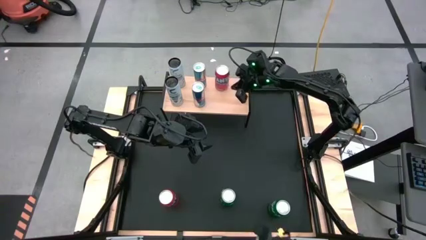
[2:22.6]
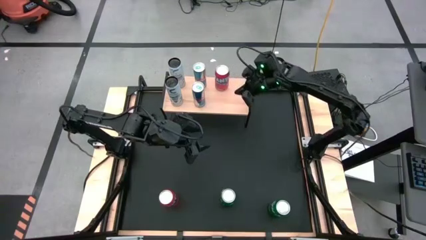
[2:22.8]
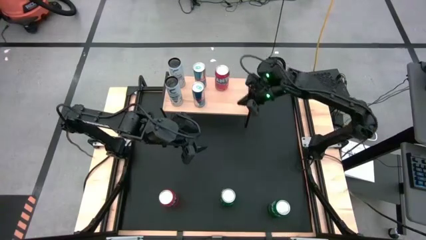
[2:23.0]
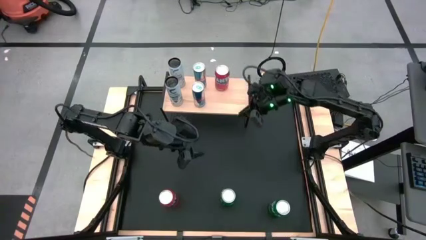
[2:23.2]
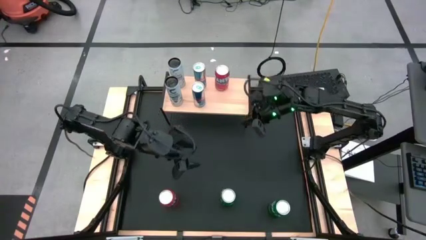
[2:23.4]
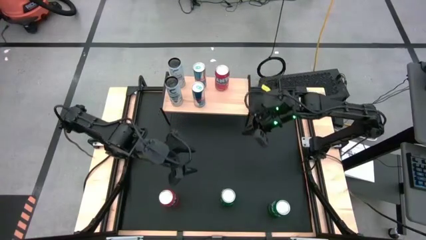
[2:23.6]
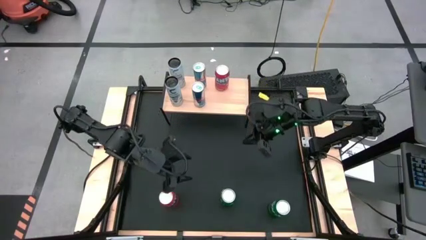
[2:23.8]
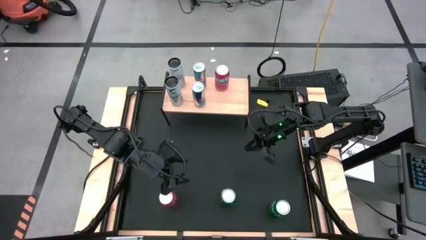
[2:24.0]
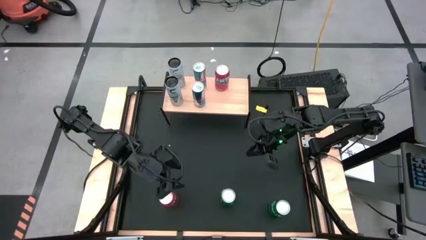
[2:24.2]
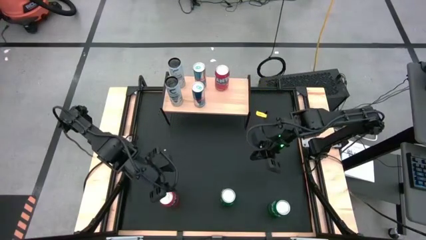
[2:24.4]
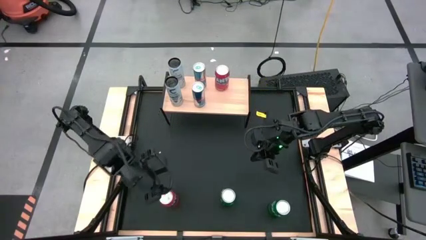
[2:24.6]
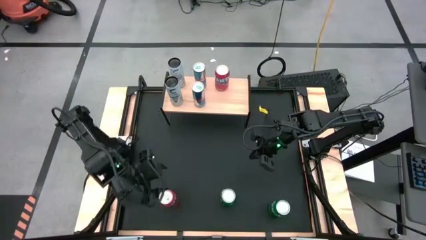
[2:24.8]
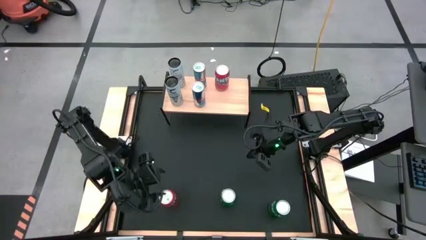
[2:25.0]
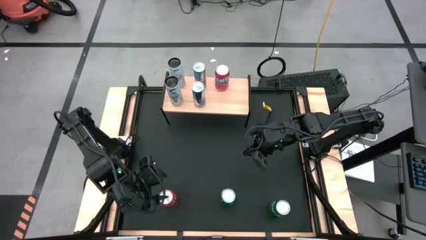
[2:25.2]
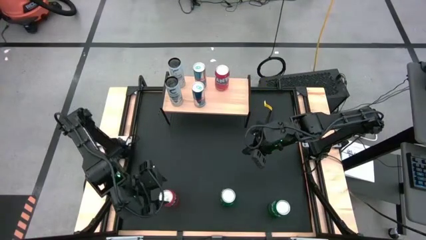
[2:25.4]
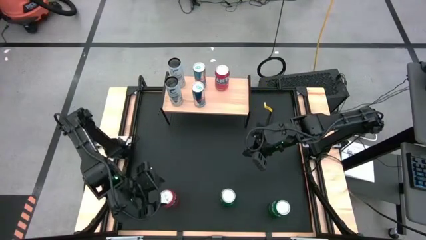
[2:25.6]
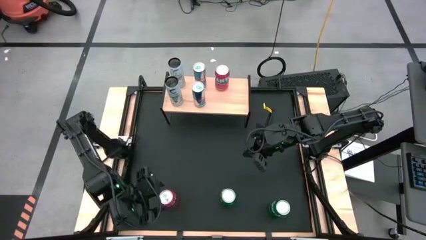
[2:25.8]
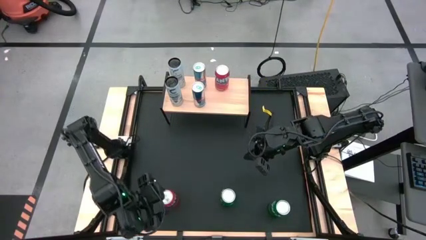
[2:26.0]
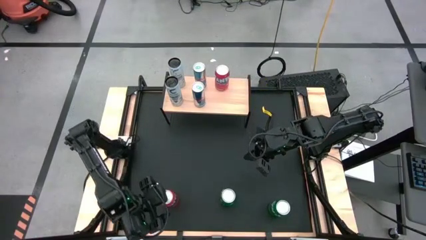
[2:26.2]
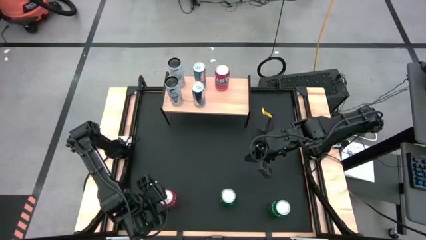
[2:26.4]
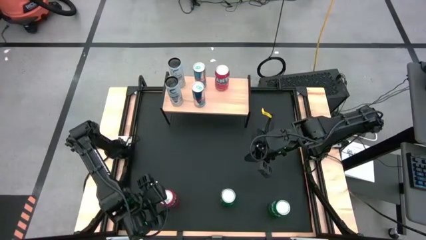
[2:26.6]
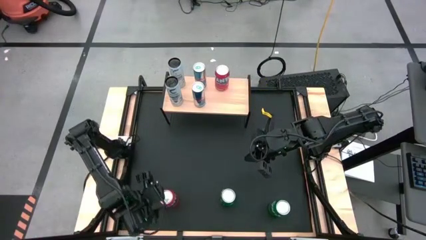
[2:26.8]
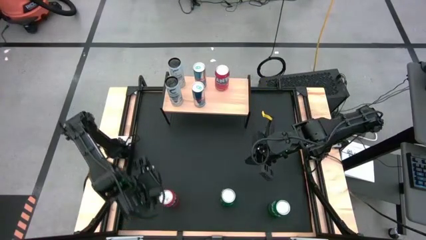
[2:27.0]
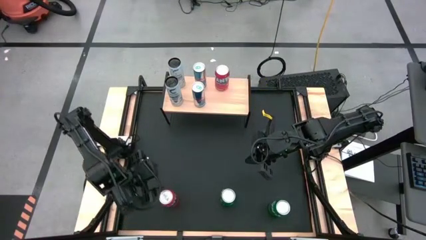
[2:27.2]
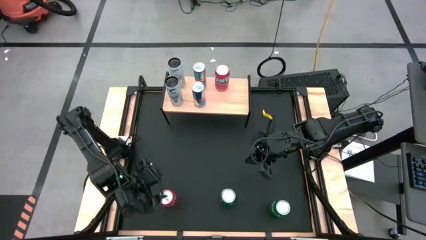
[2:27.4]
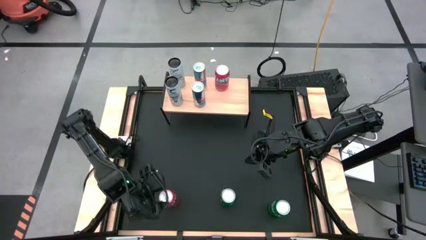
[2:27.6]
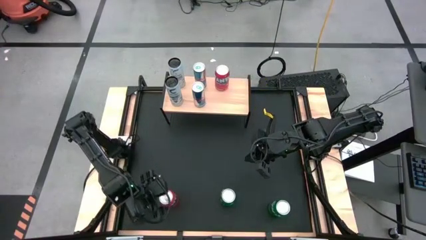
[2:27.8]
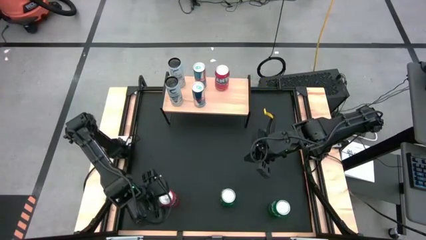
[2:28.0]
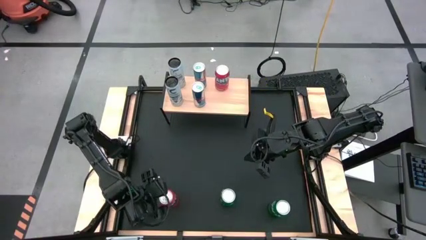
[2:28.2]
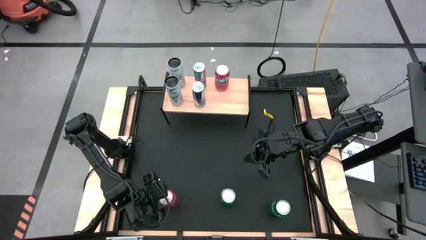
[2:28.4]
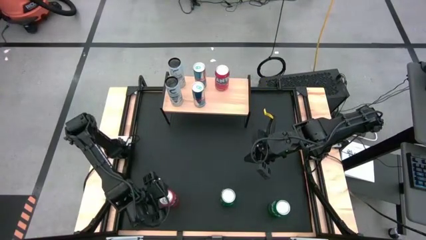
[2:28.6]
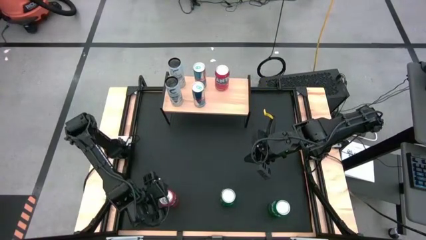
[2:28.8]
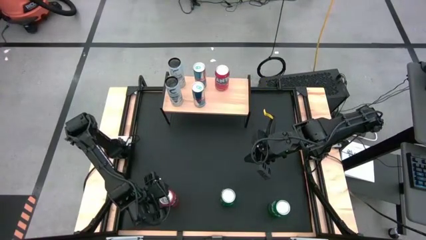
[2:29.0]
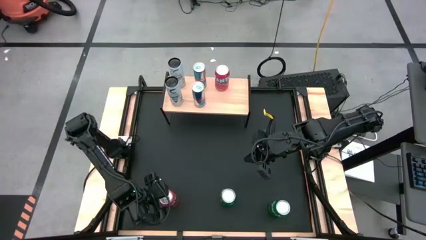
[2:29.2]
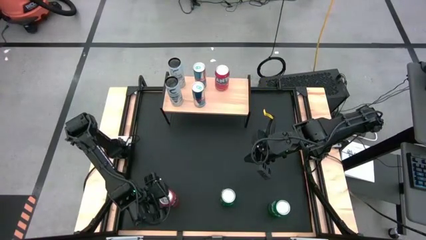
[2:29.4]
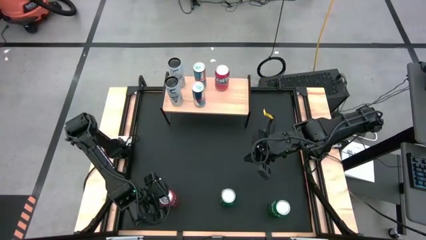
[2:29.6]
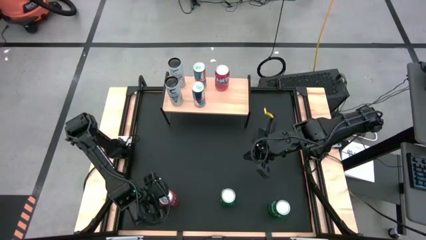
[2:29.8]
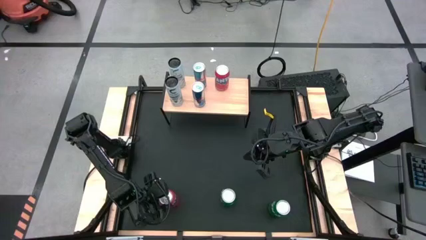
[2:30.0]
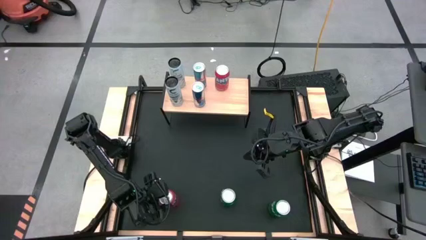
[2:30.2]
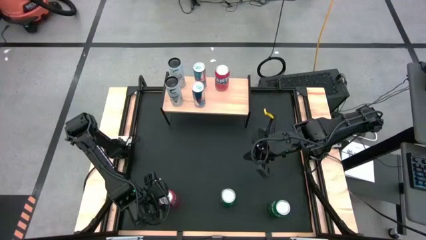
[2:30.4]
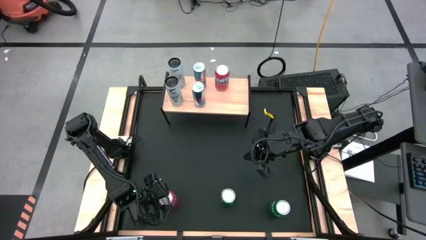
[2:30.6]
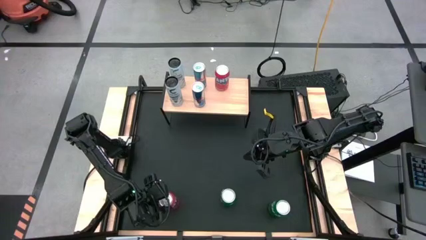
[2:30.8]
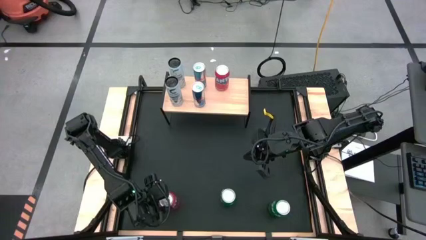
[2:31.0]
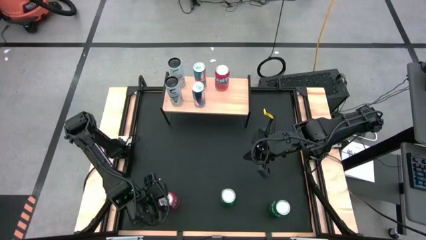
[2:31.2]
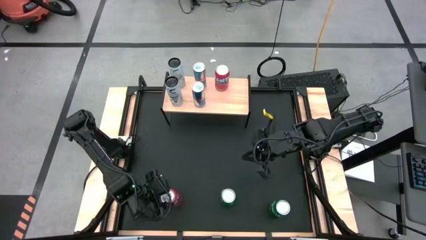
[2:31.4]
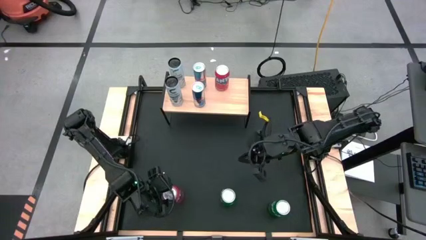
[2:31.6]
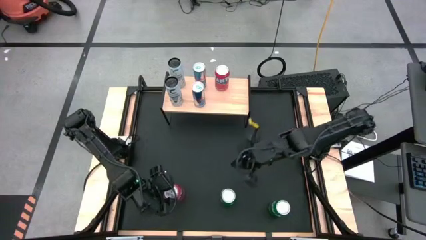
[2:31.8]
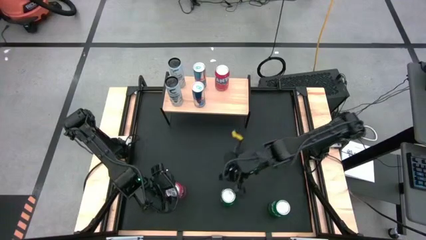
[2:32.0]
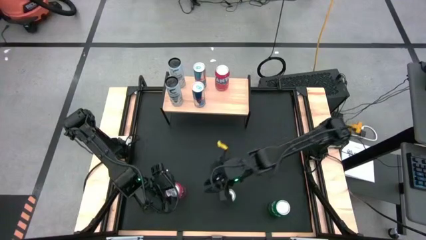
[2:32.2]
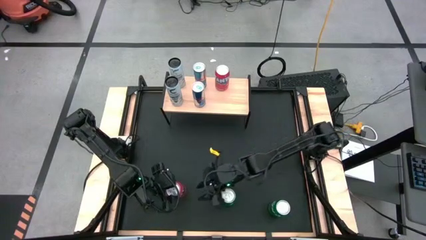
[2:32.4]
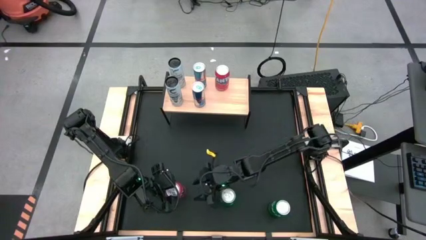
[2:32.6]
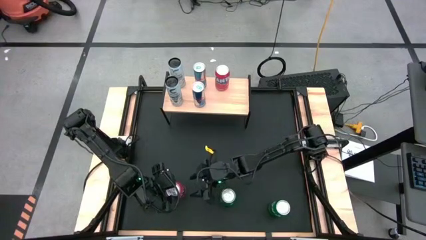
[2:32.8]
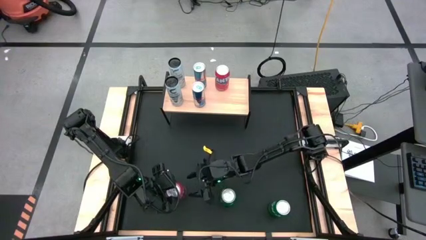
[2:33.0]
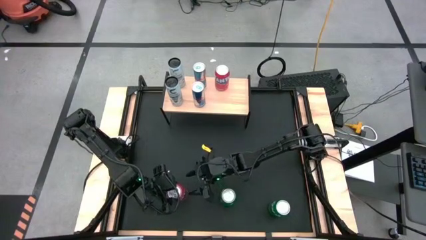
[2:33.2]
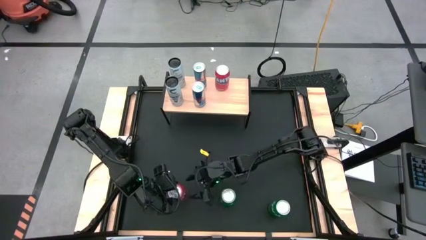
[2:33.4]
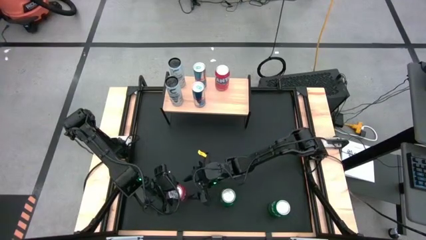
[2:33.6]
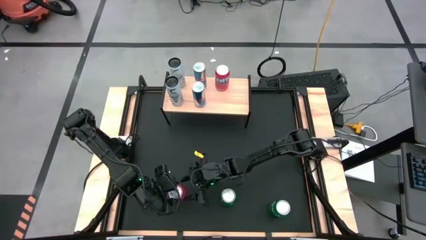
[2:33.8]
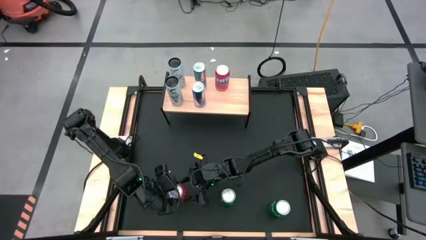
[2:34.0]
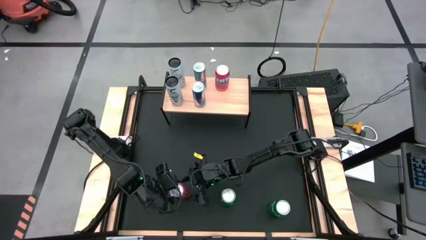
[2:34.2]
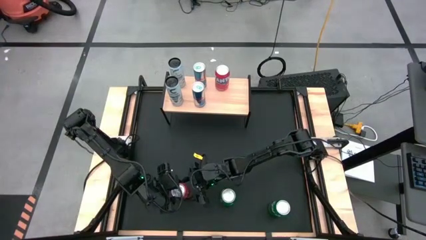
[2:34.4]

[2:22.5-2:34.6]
Task: Place canned beverage on shelf
Put the orange soda can, aligned with the other orange soda can on the shelf

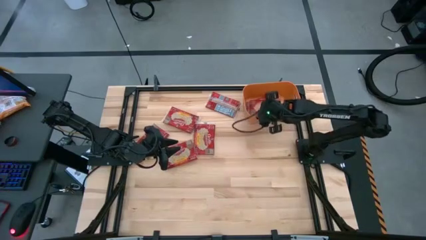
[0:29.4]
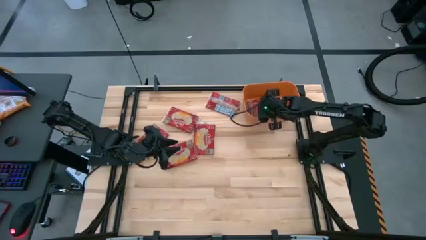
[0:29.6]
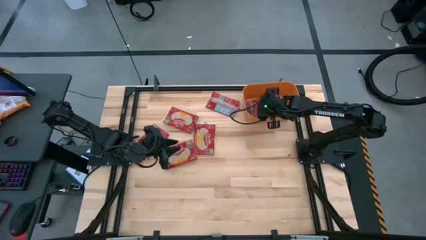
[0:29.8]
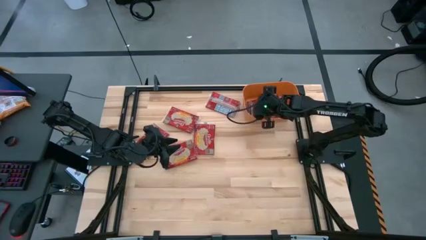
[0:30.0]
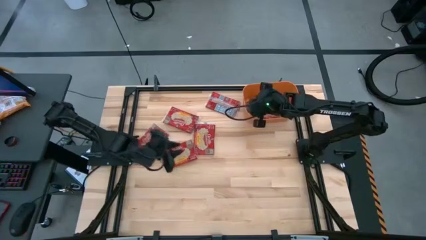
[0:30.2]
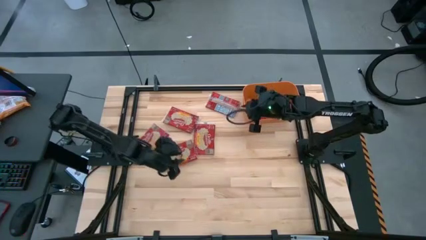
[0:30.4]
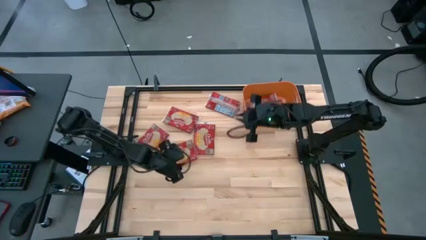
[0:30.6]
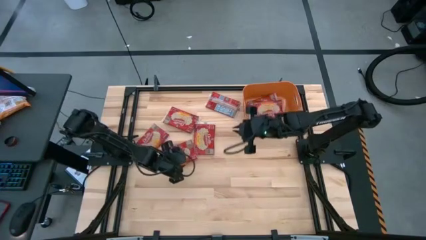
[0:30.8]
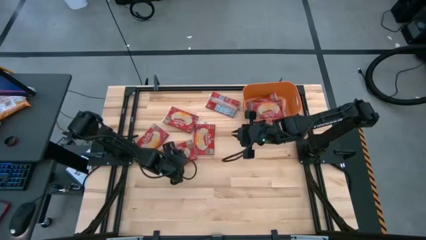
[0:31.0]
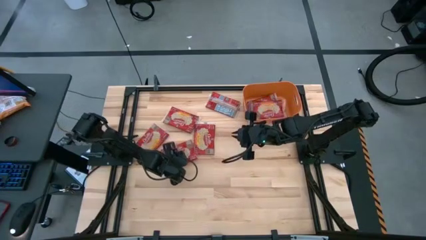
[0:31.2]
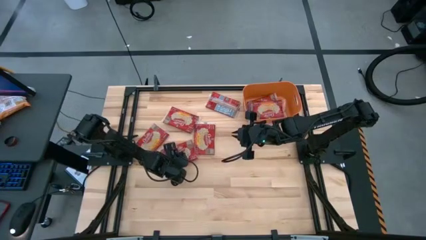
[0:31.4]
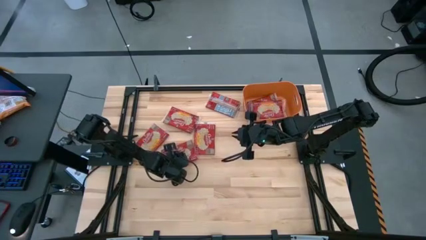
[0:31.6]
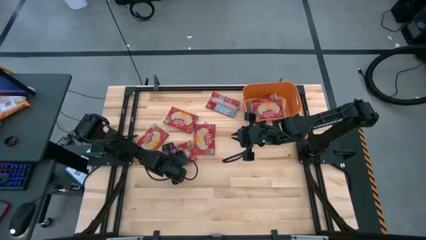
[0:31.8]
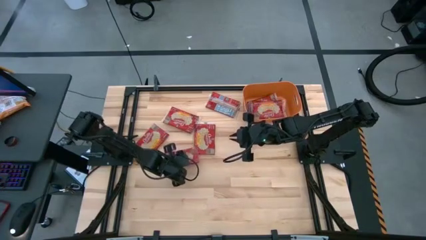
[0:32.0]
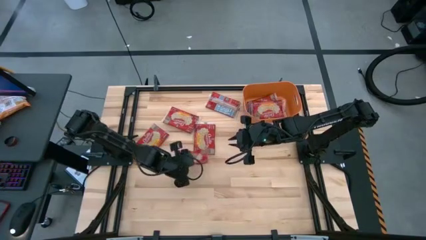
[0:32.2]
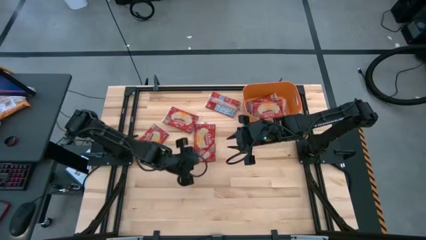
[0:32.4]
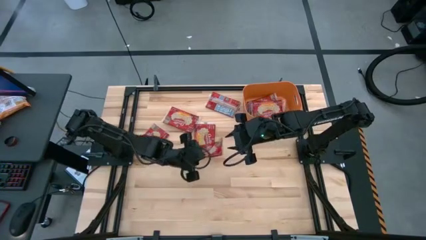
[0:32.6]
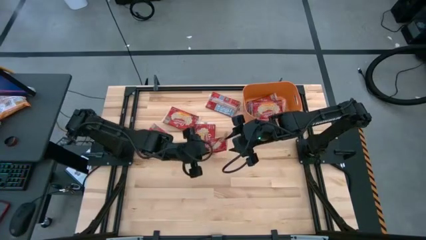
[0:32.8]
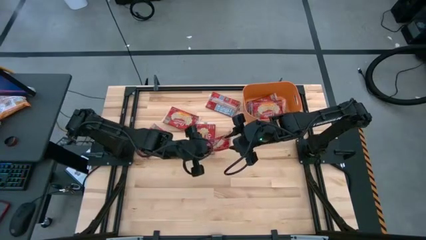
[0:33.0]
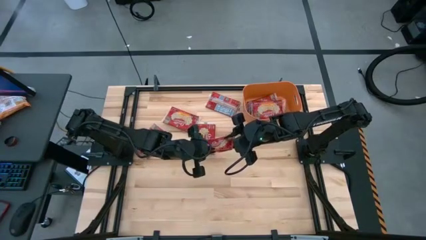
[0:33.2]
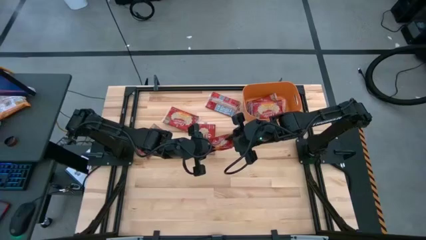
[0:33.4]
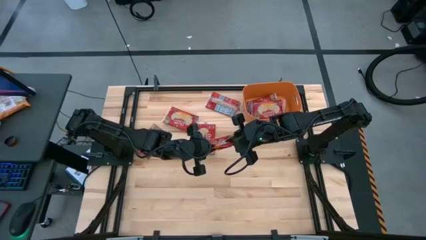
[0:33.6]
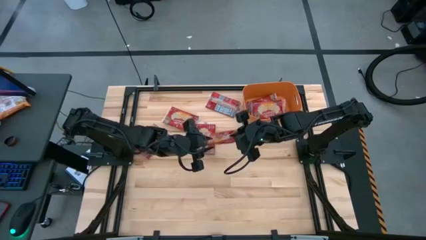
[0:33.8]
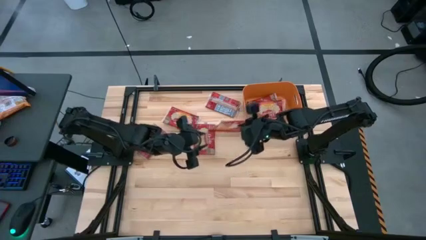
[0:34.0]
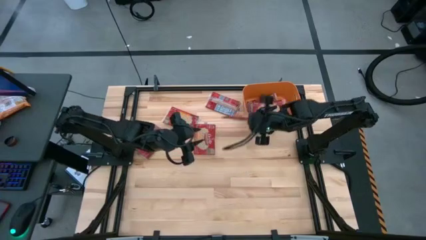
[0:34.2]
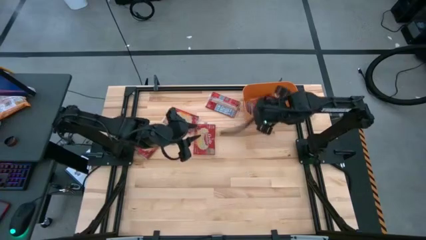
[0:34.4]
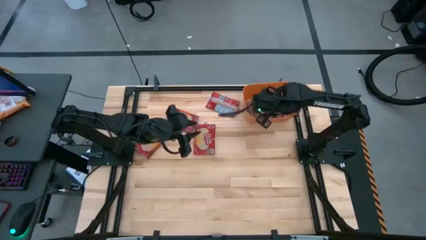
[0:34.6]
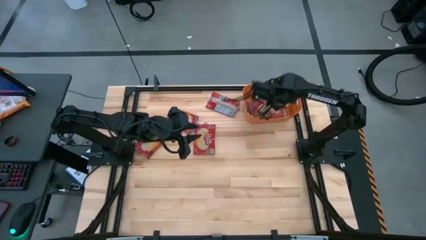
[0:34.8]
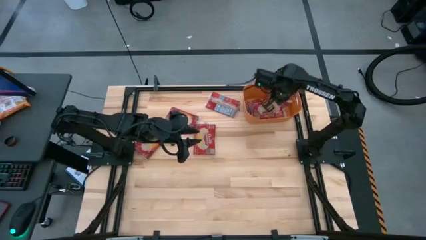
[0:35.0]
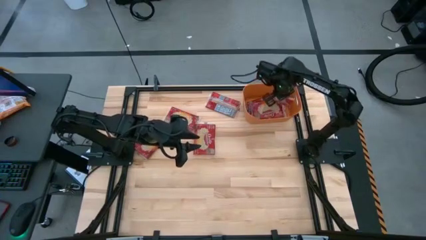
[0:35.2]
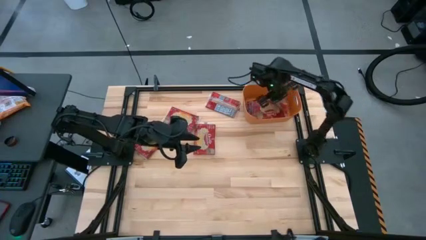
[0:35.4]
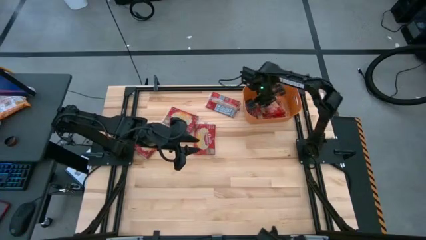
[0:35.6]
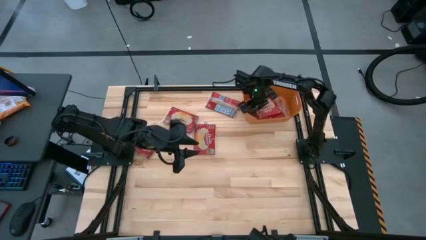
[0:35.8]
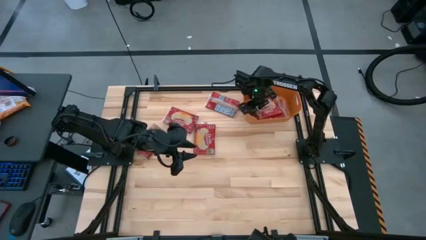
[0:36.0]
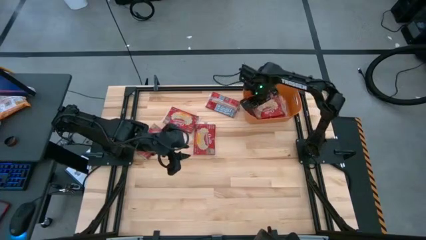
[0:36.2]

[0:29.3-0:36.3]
Task: Sort popcorn bags into baskets
Put the red popcorn bag into the orange bin
